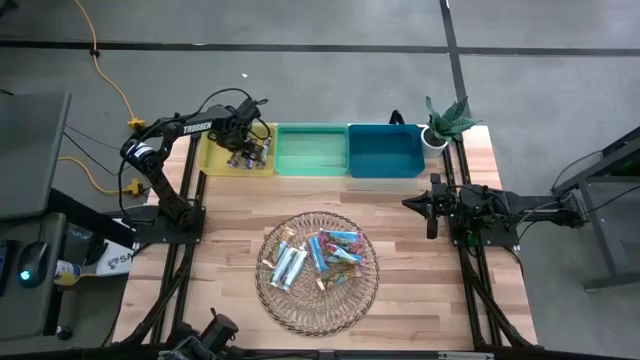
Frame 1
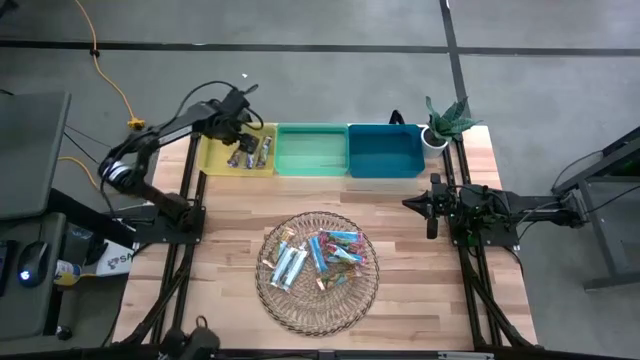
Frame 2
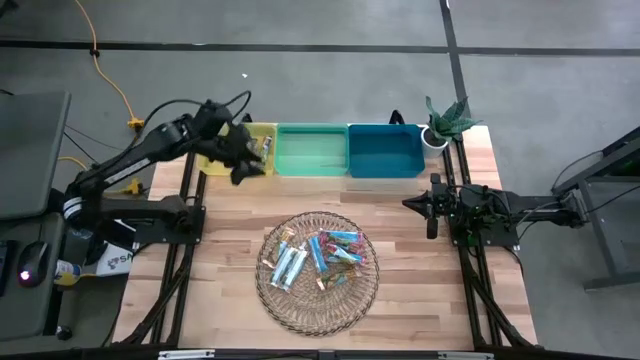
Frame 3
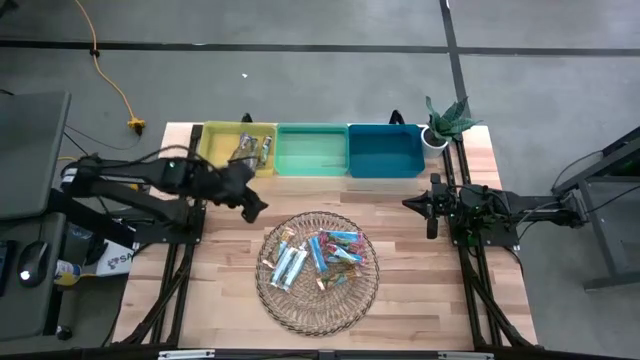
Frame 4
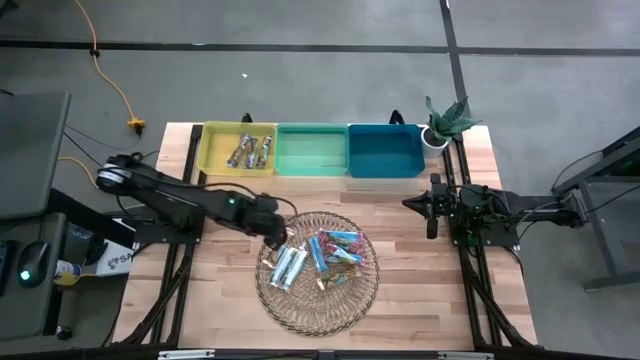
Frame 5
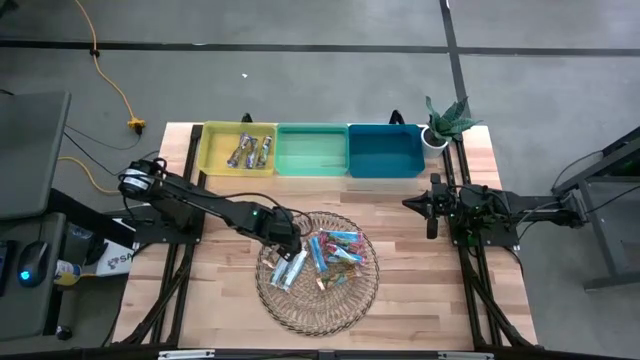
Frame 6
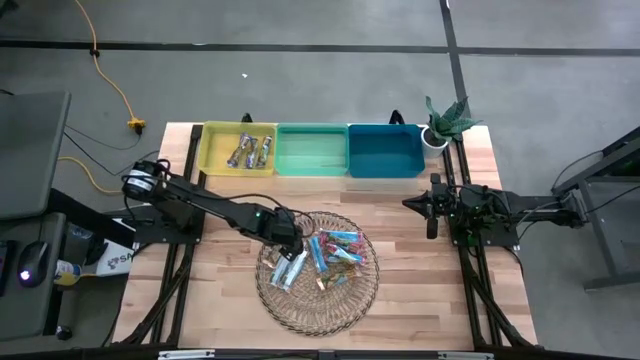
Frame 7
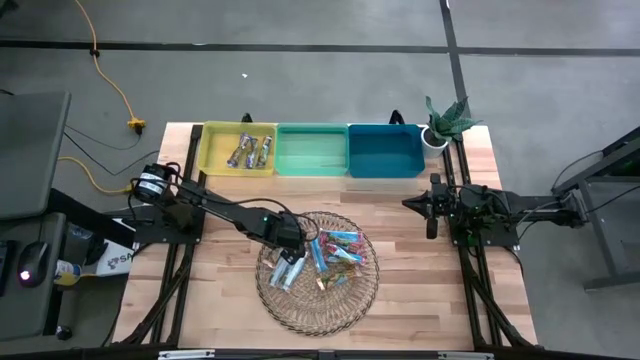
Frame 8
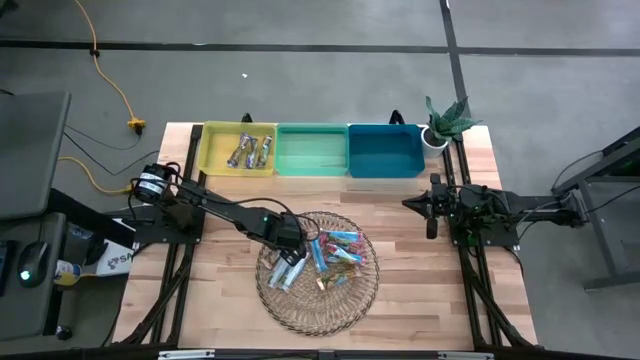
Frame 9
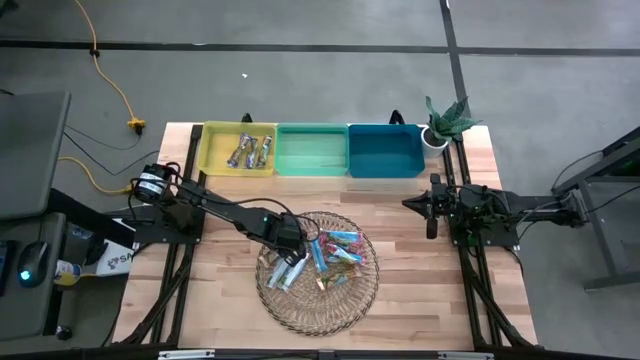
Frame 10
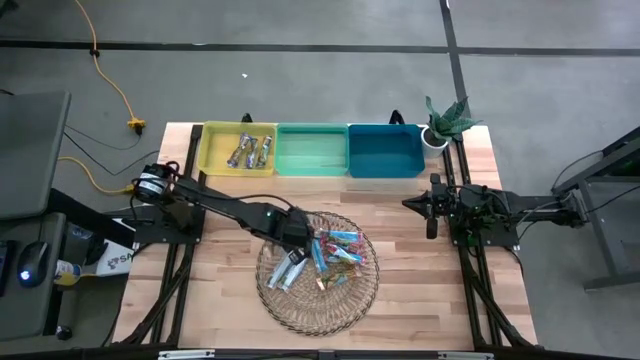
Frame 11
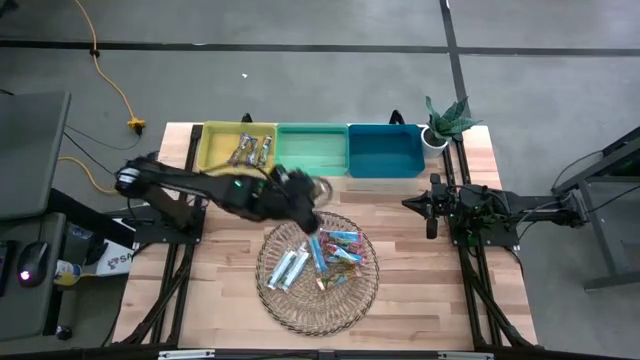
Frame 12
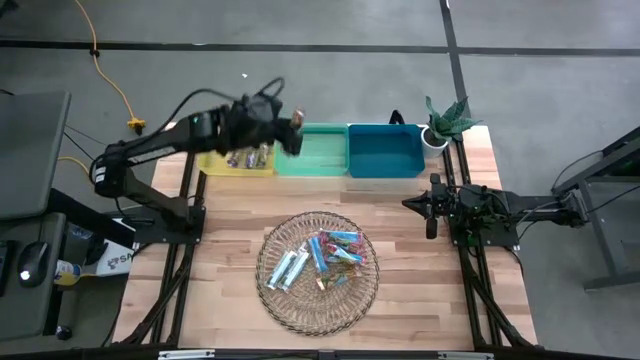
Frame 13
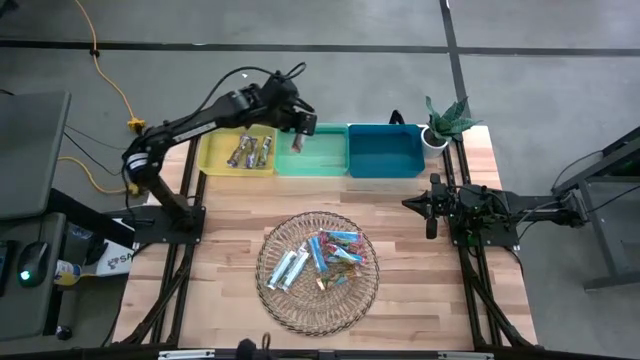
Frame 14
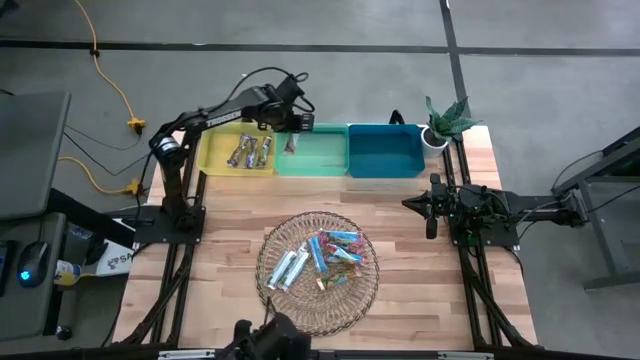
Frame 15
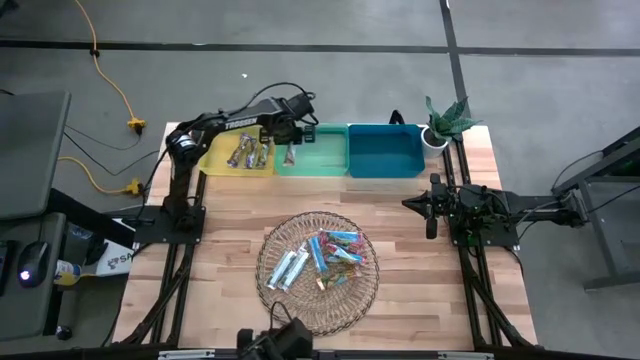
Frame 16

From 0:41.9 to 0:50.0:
Task: Pick and place Granola Bars by type
Put the yellow granola bar into the green bin

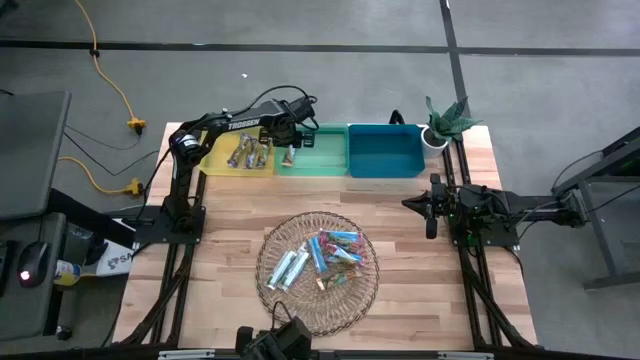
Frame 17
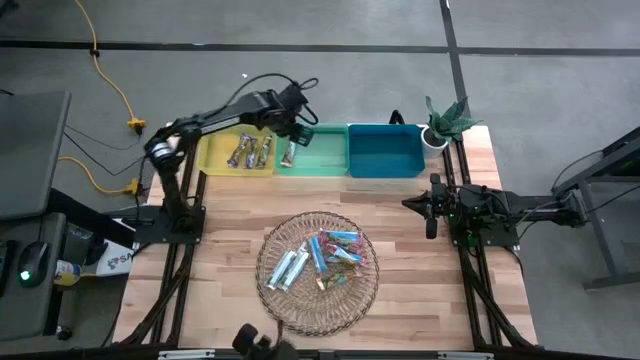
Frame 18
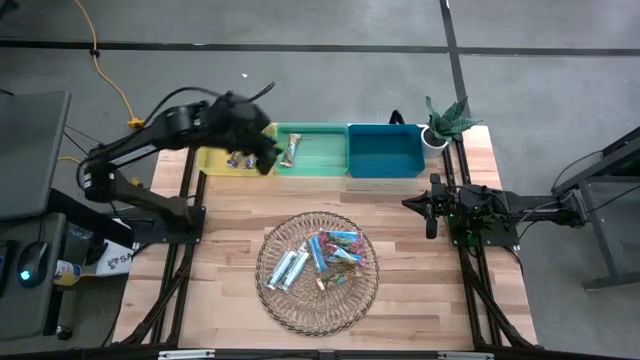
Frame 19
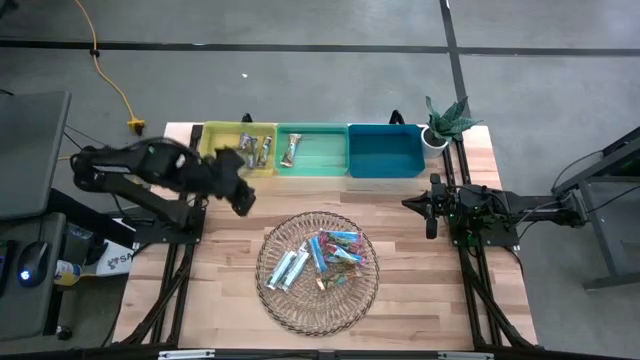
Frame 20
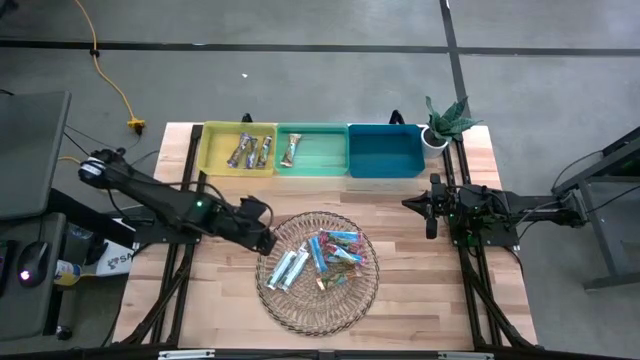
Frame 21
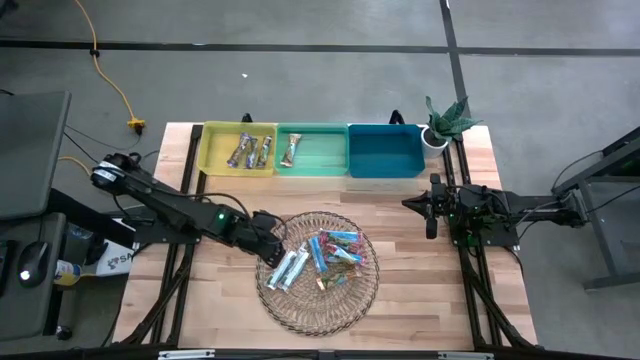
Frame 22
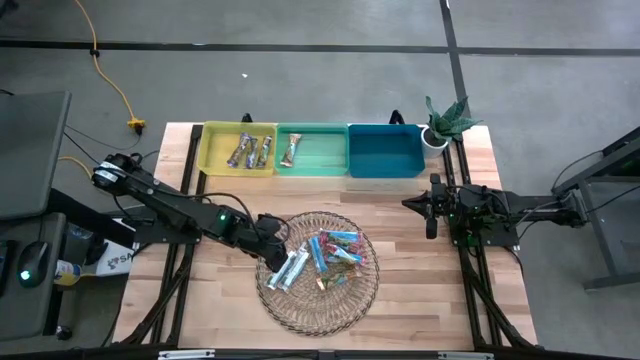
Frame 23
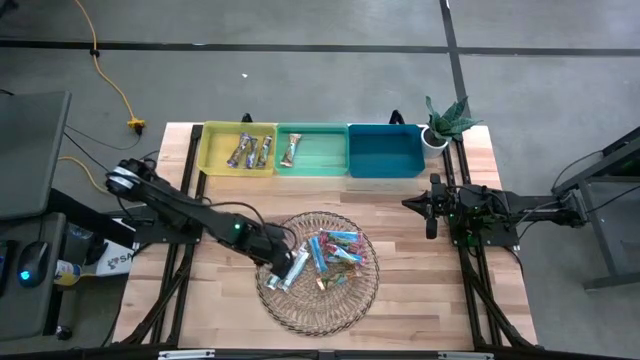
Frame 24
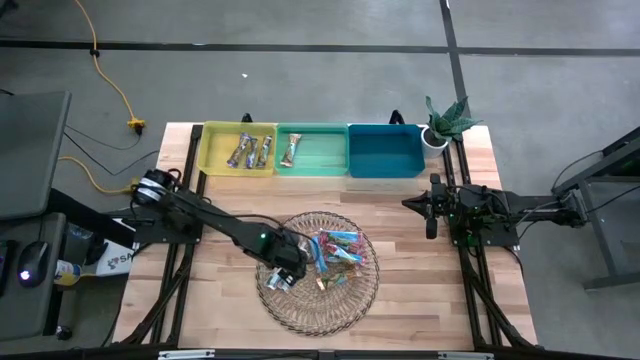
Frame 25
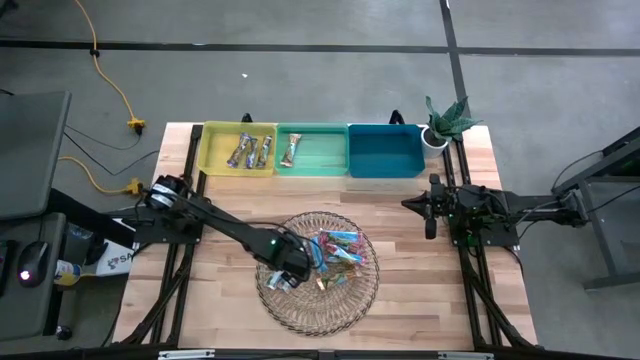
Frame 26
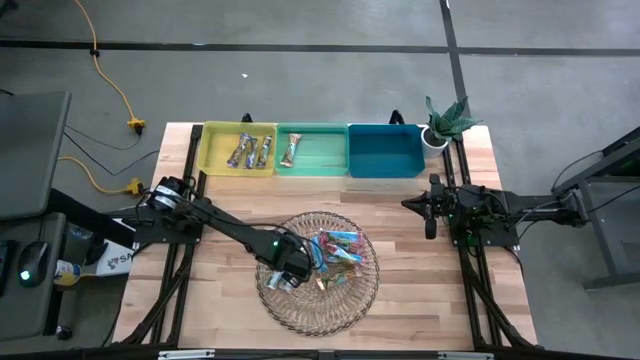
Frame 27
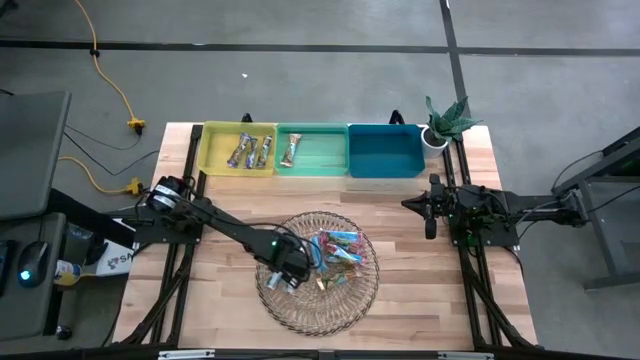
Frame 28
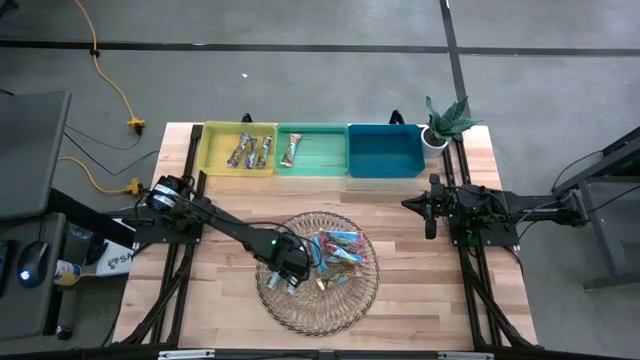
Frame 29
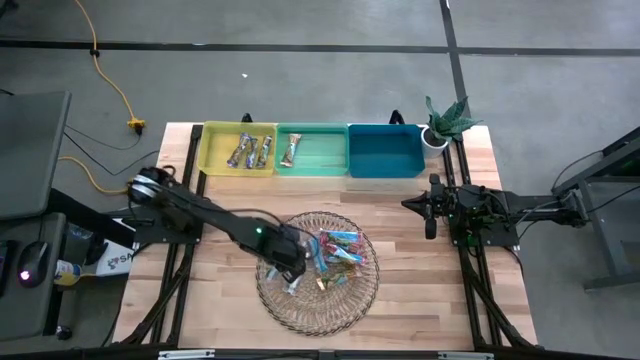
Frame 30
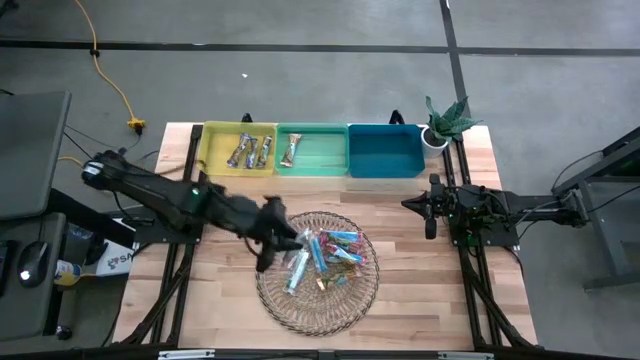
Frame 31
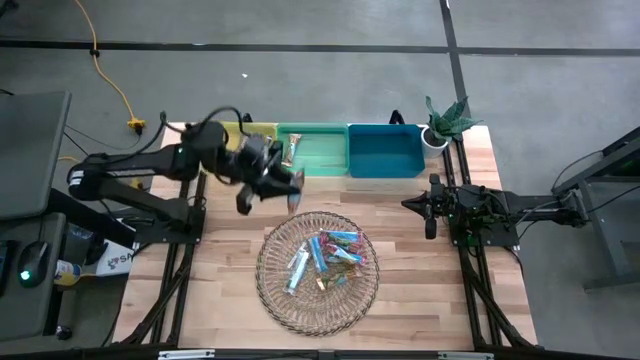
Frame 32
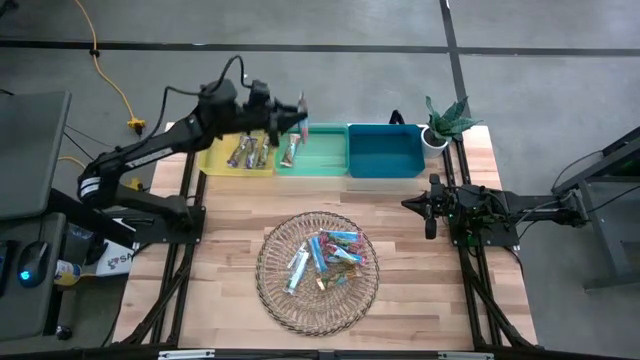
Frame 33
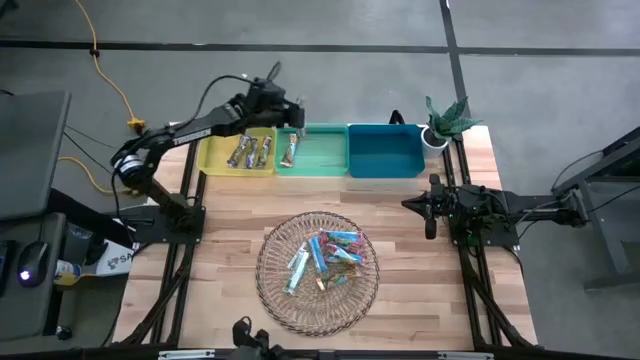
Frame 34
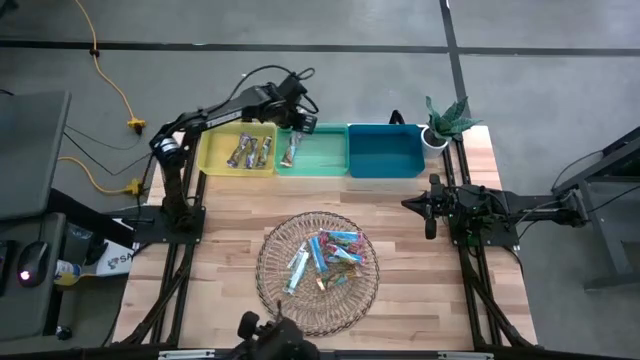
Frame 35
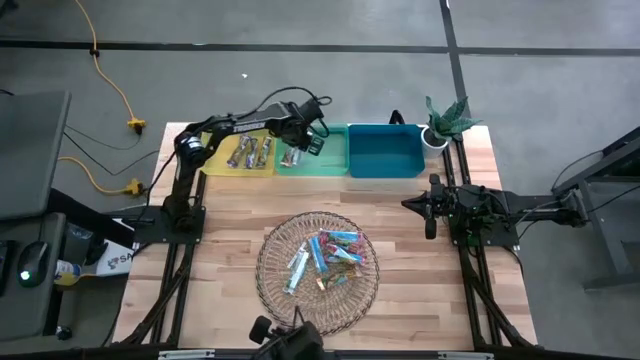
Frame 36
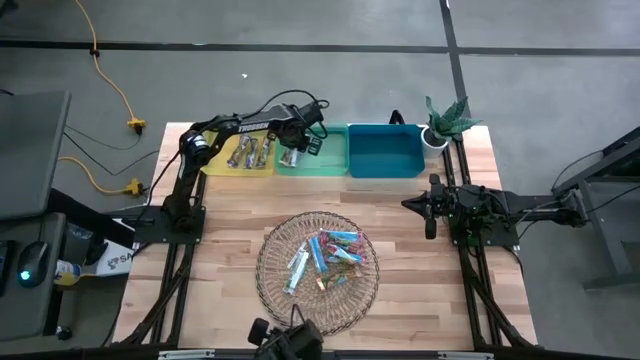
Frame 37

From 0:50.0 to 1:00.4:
Put the yellow granola bar into the green bin
